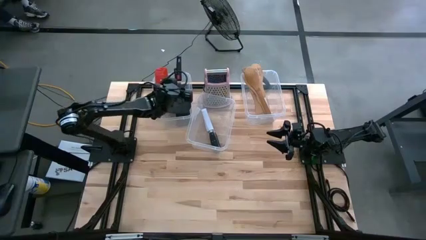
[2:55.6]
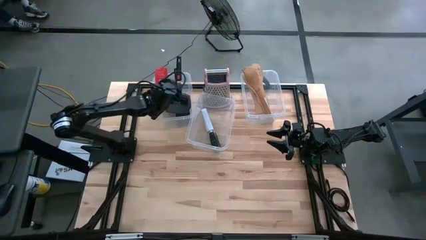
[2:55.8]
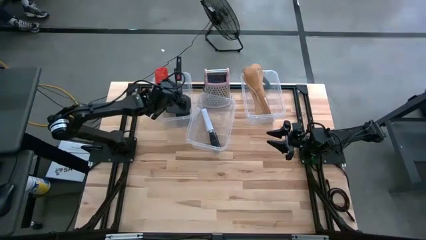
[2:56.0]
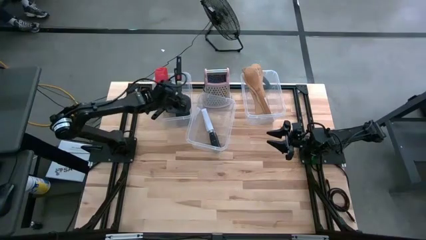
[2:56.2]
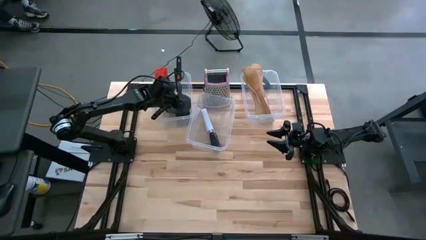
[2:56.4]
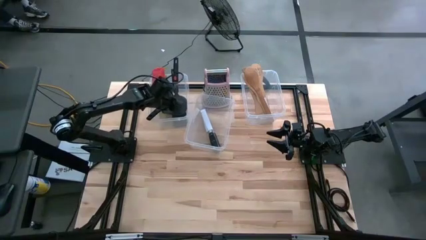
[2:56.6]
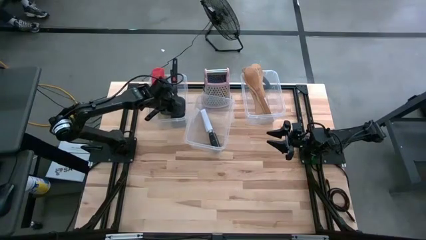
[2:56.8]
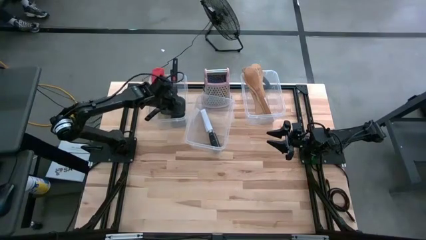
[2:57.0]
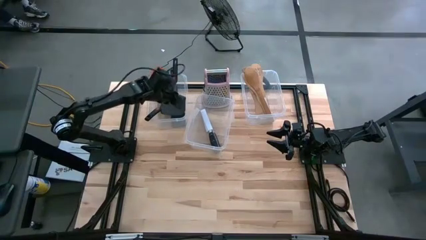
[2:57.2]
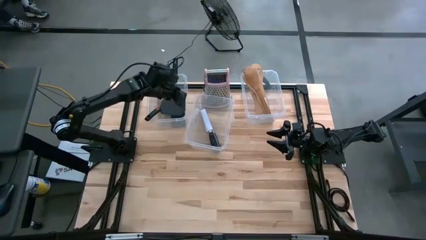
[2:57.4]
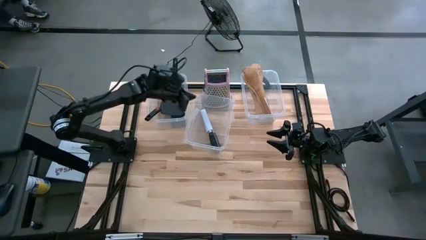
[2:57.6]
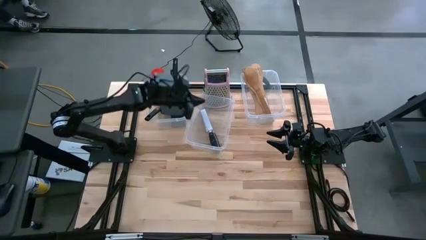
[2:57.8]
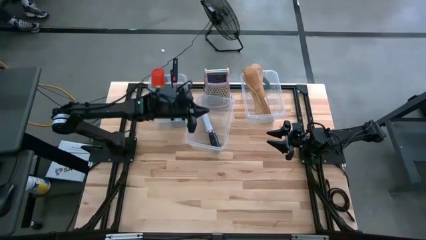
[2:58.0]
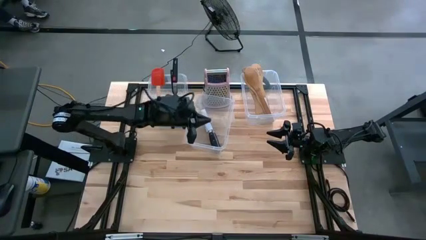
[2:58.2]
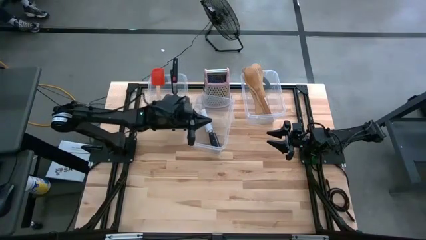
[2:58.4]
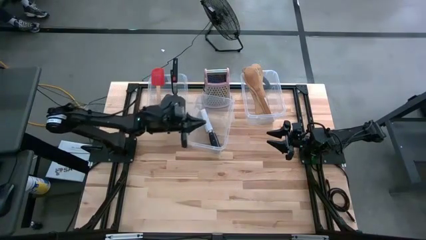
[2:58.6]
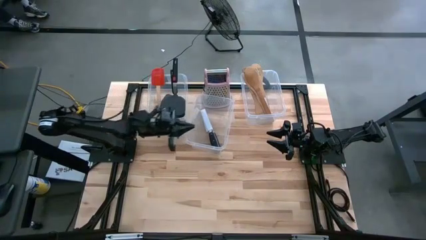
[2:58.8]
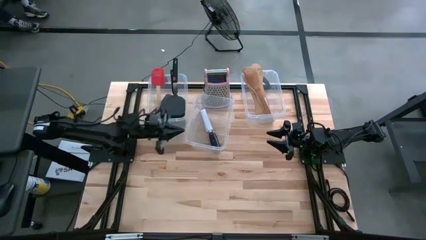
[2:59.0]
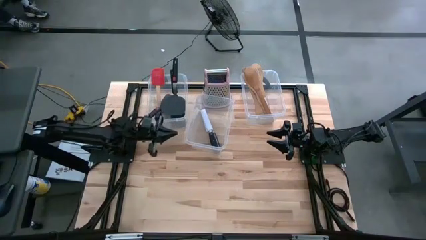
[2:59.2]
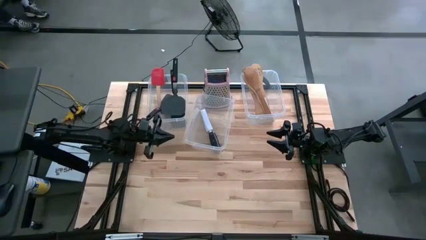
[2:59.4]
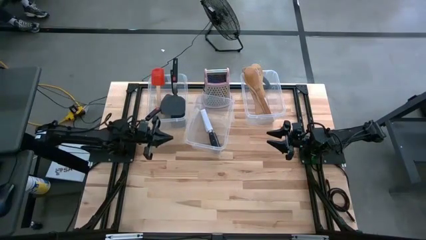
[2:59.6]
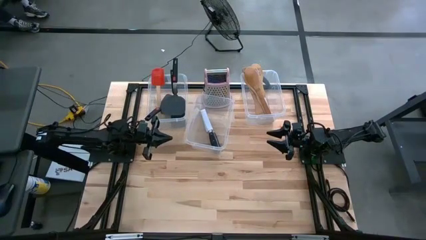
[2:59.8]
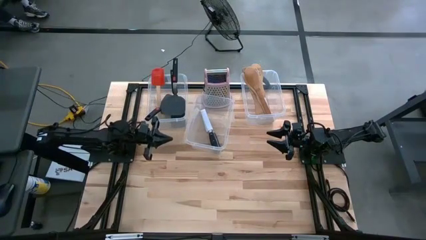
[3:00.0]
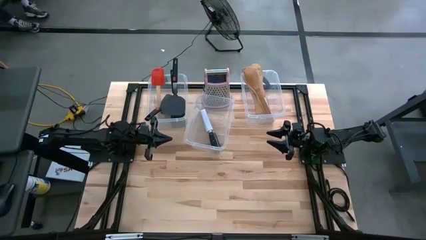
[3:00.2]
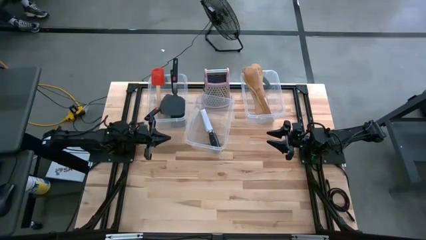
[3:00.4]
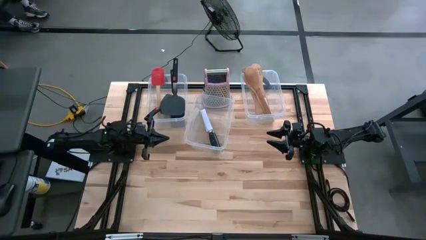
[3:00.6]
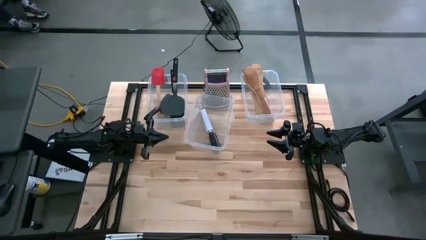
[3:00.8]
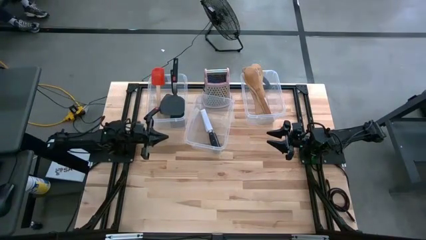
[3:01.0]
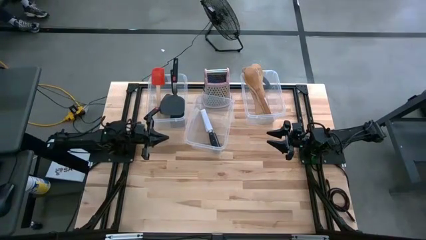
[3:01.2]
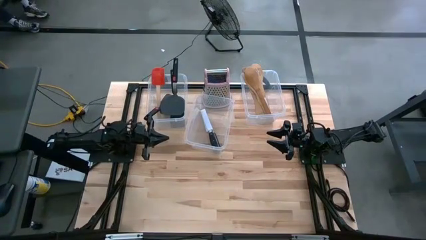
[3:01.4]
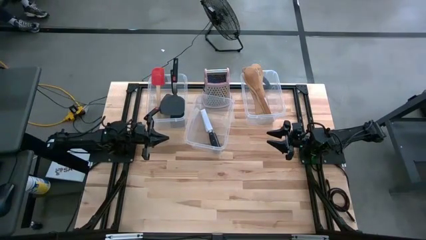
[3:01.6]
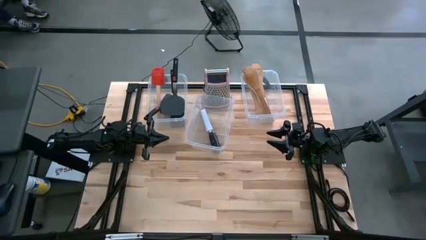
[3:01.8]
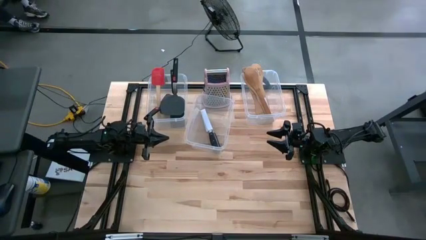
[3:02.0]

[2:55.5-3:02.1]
Task: Pick & Place Kitchen Items
Return to Home Position

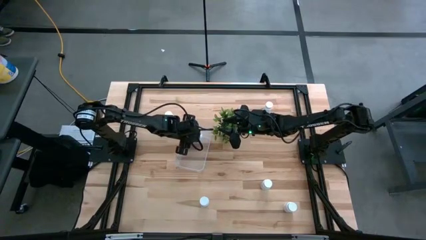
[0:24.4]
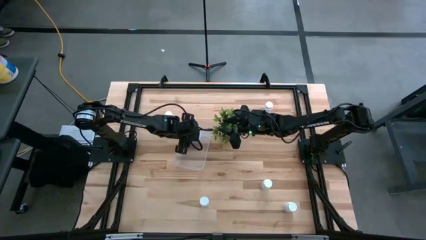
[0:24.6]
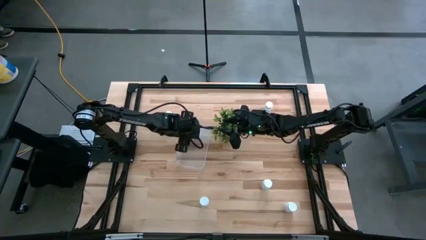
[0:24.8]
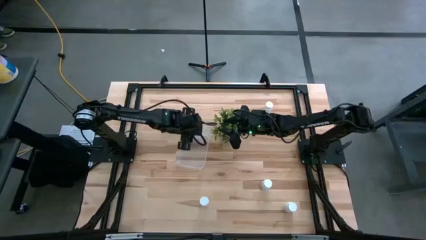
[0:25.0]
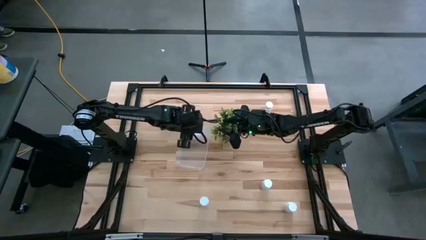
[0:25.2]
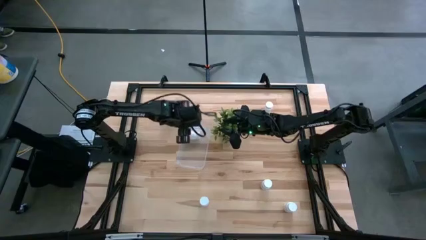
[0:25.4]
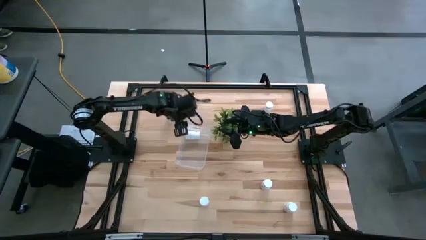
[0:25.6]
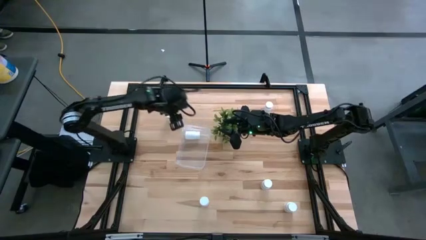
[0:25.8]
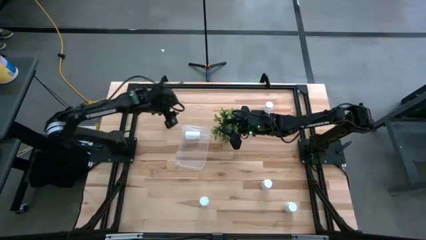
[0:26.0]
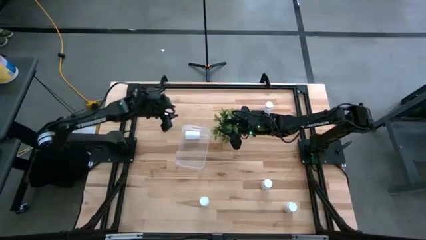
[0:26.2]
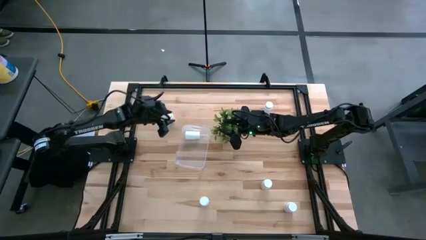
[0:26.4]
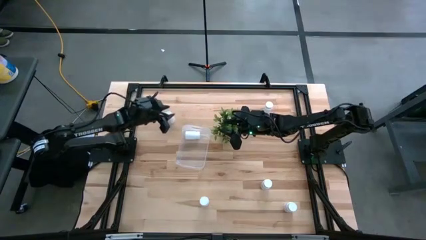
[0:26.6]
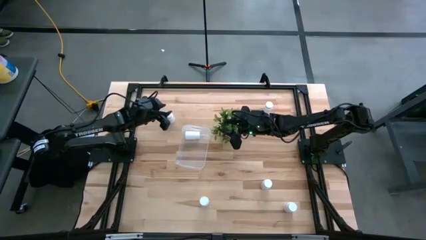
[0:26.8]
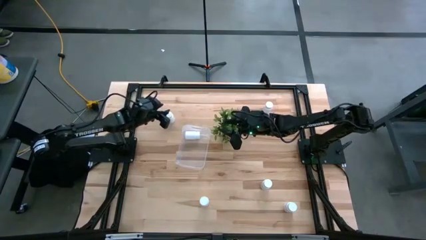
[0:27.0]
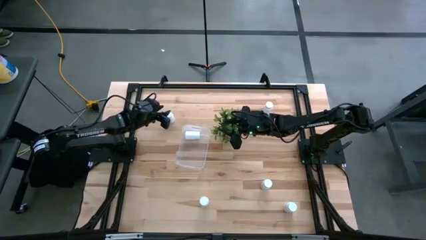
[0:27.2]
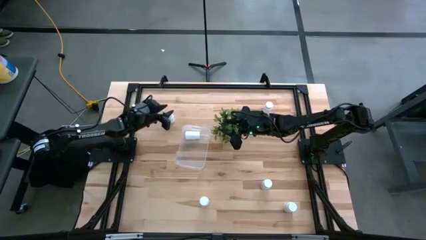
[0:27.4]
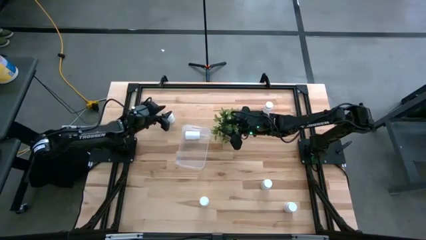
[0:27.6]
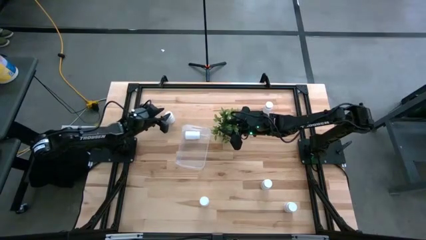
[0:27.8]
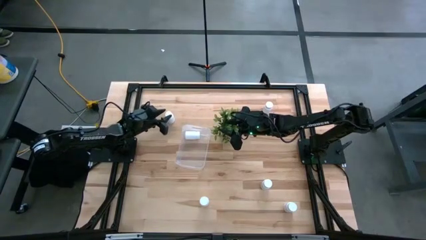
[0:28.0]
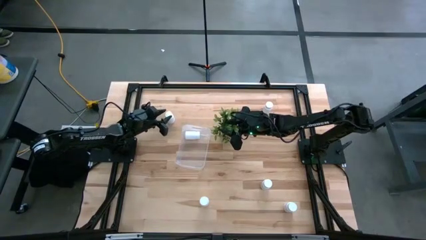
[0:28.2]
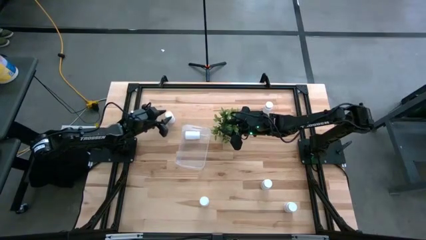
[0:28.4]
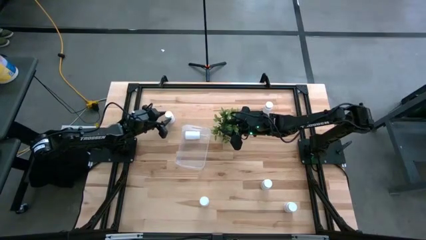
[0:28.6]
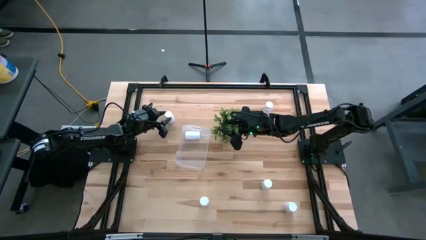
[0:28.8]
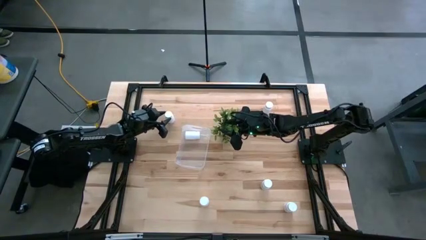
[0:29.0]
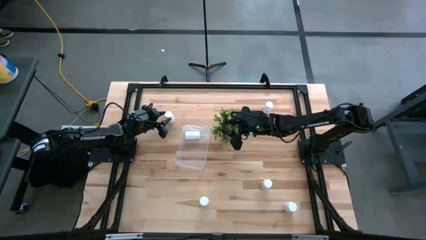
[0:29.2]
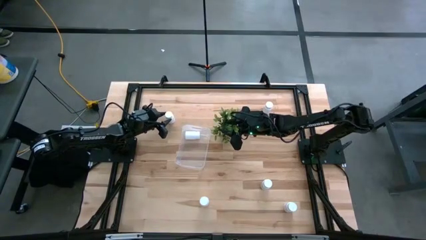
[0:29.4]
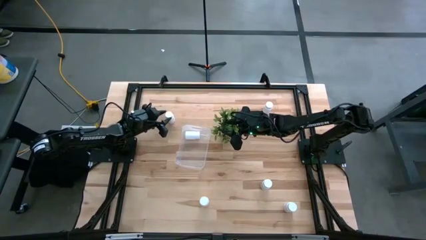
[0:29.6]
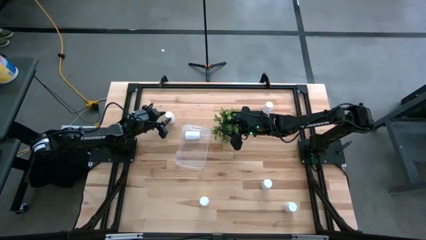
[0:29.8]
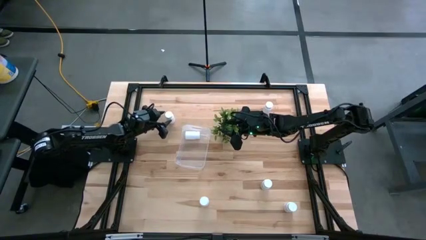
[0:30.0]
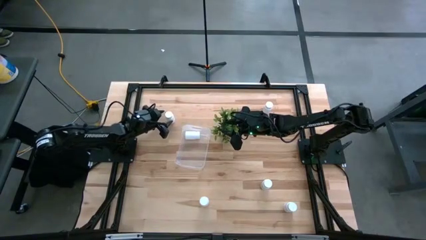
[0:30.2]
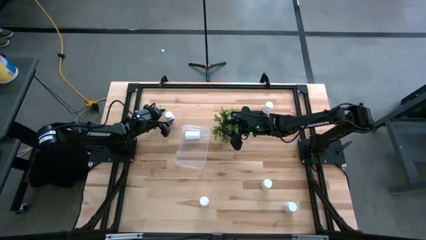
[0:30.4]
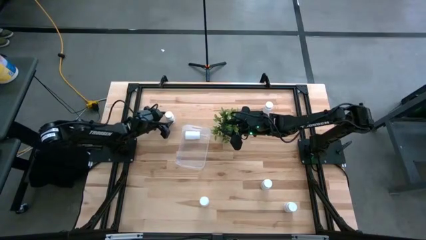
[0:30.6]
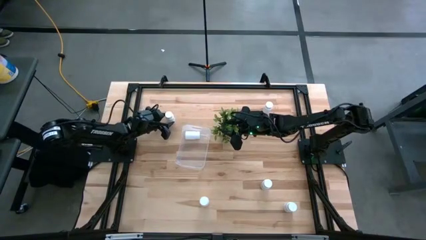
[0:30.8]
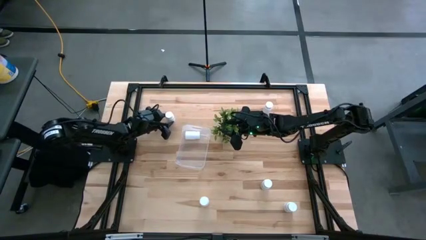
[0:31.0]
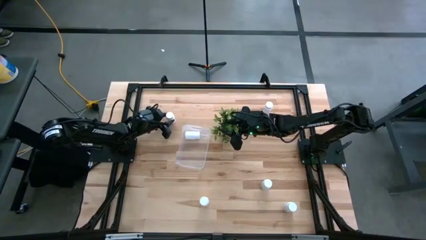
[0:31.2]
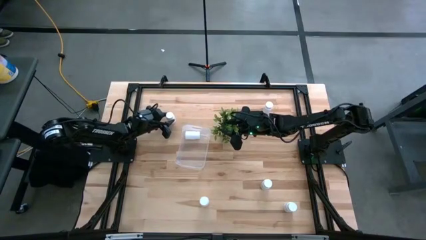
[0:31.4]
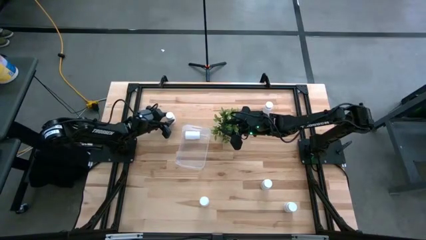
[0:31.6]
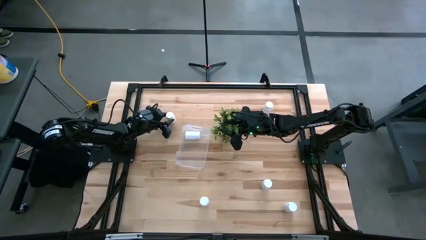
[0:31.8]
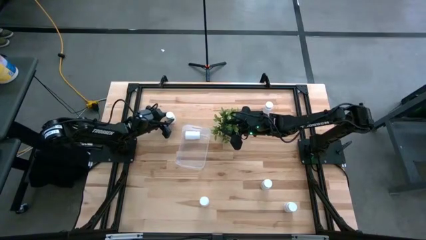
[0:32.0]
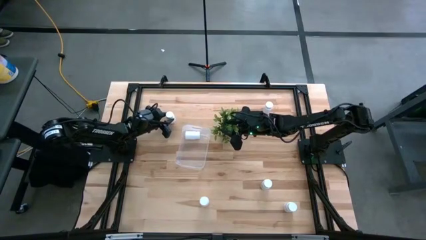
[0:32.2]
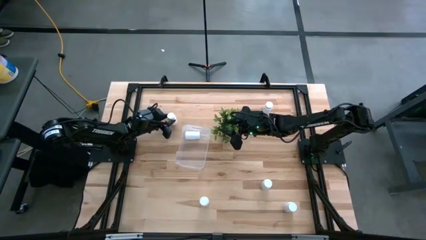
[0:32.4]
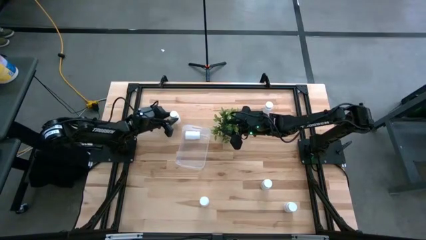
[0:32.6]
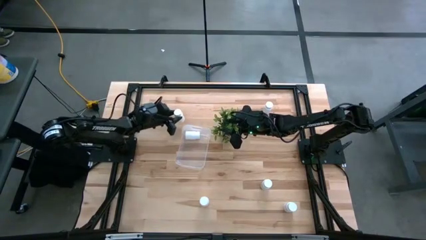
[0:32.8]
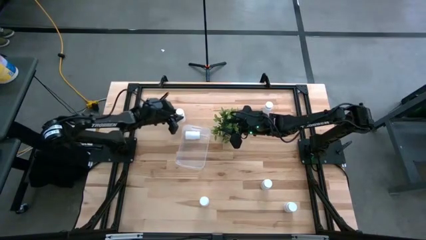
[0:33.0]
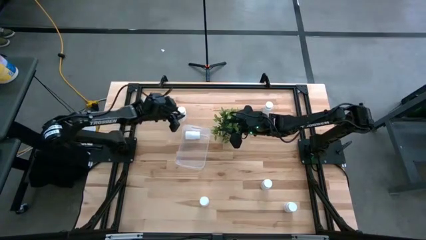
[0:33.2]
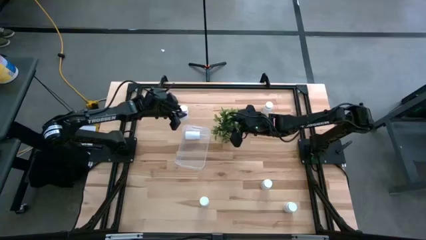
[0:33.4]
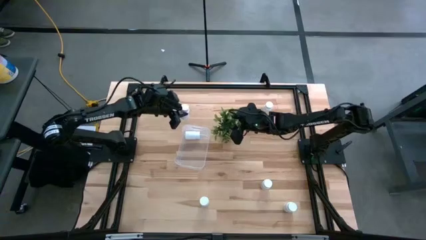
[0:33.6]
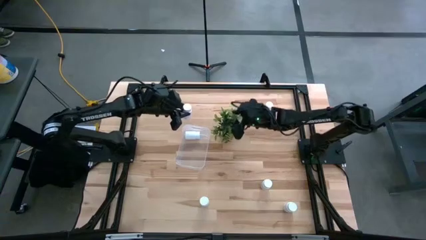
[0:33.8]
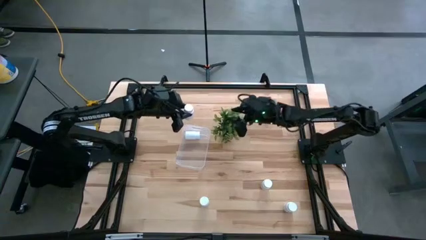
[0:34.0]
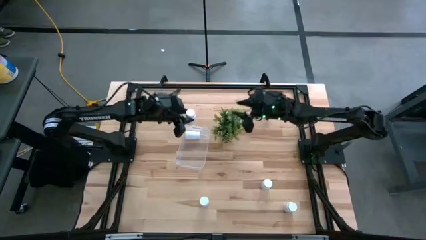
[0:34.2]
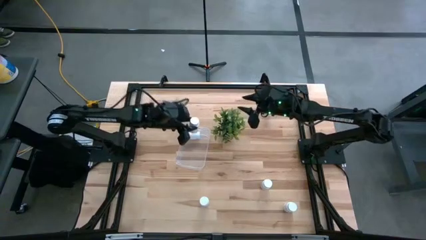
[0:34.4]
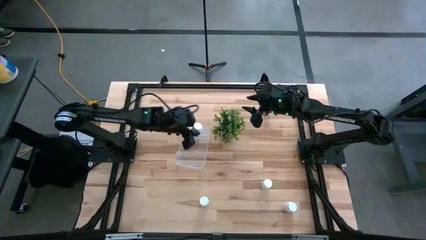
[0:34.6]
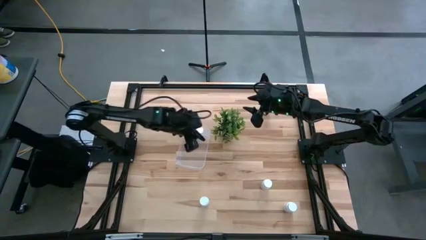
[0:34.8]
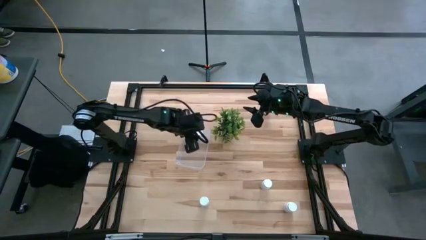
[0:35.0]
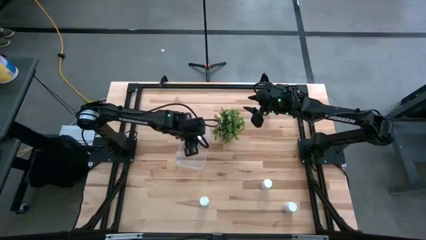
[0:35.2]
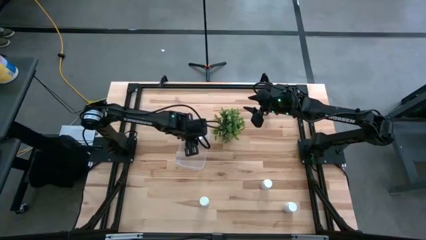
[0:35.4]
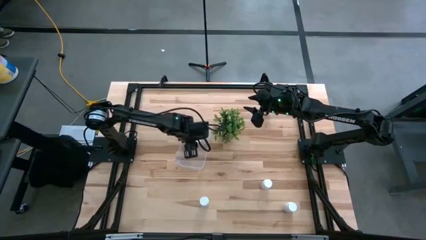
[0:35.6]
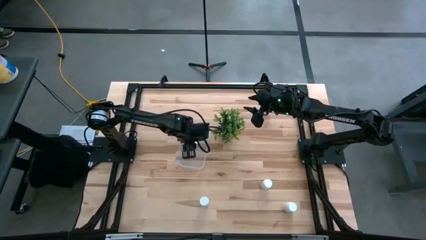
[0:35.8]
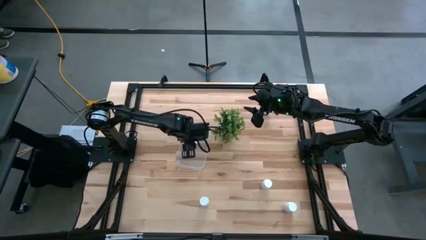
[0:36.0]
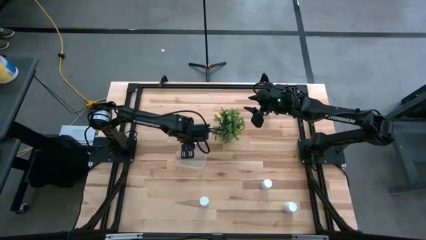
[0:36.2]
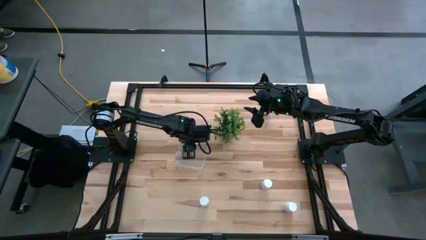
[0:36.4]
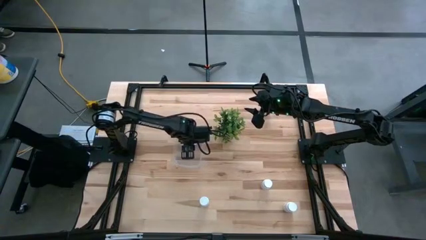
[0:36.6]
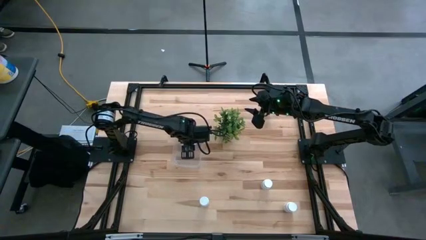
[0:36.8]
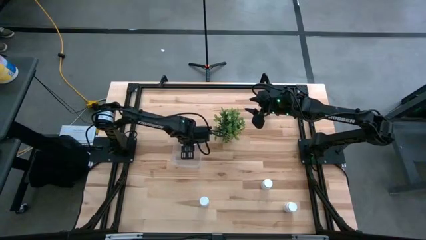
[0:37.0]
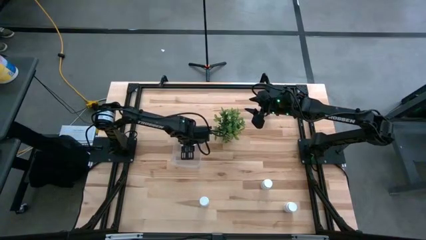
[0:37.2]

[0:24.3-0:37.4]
Task: Pick and place pill bottles into a basket
Put the white pill bottle into the transparent bin
